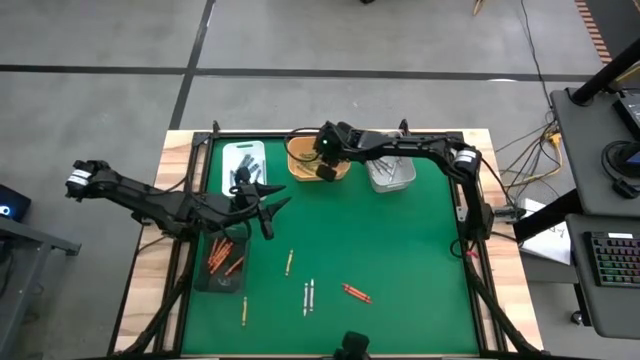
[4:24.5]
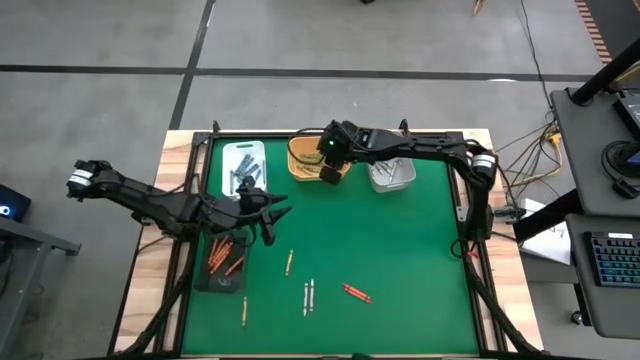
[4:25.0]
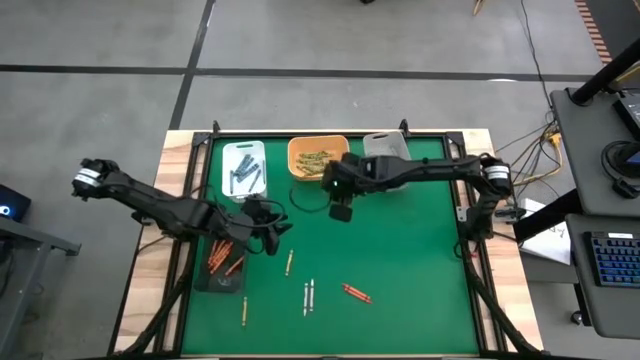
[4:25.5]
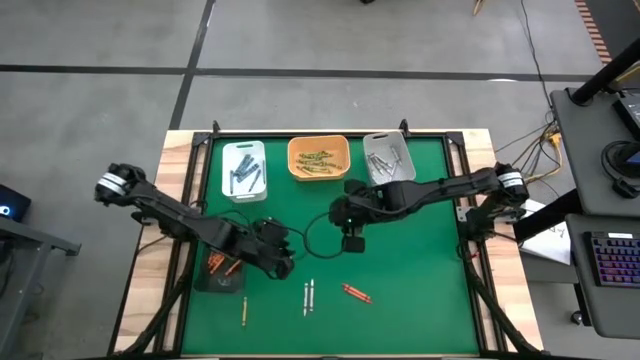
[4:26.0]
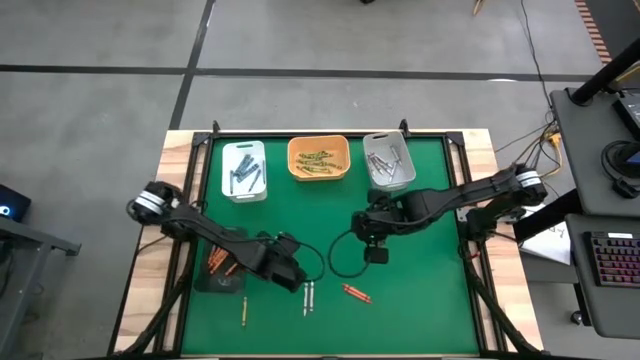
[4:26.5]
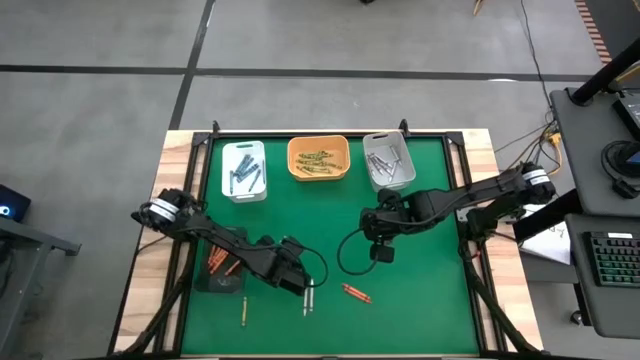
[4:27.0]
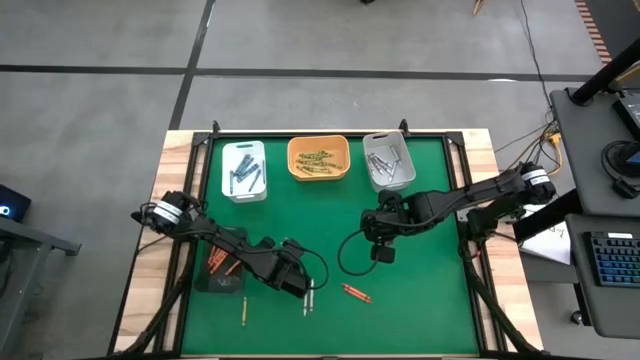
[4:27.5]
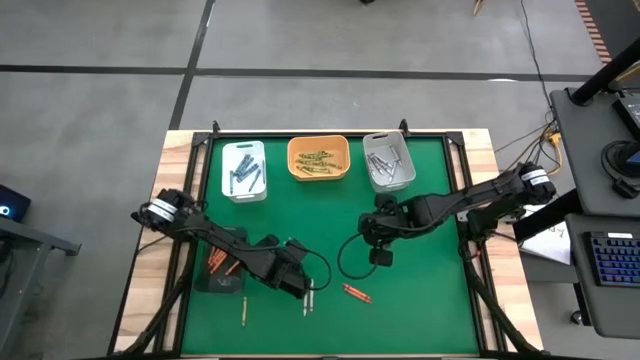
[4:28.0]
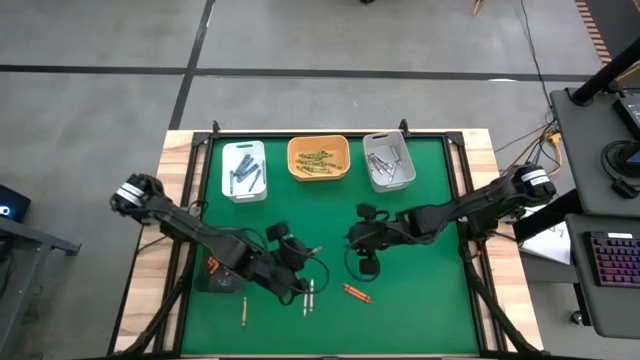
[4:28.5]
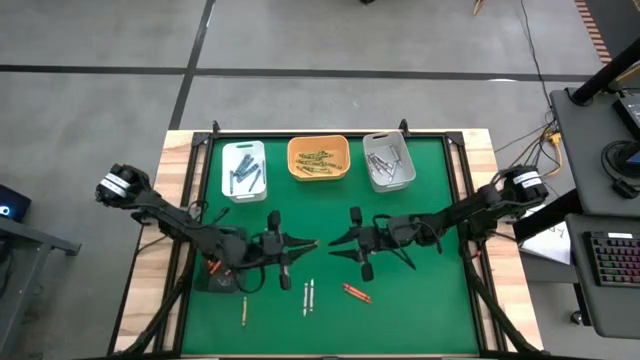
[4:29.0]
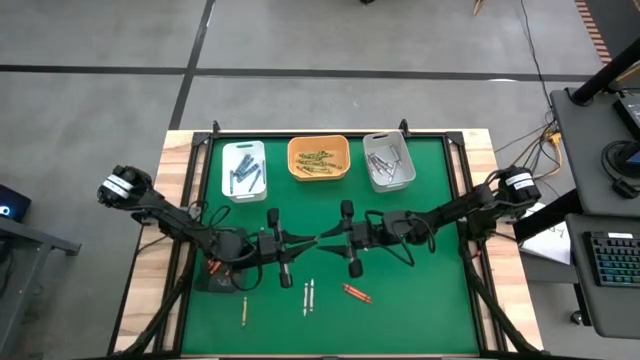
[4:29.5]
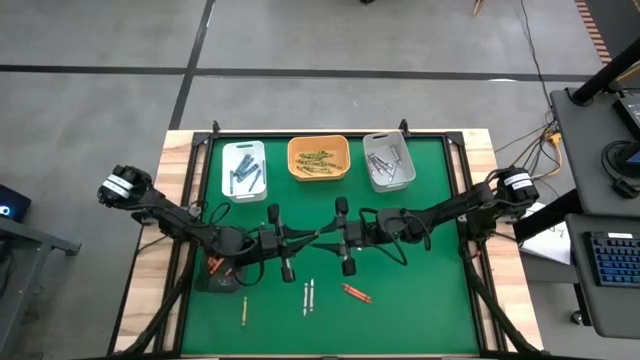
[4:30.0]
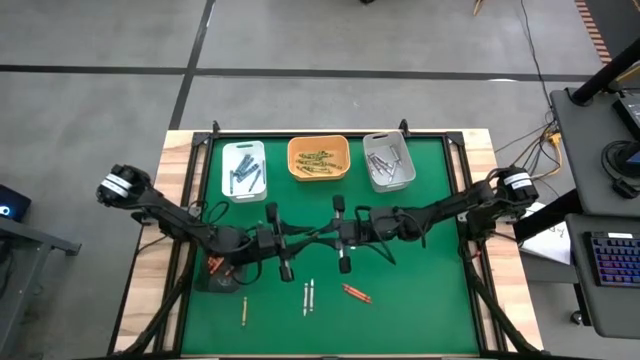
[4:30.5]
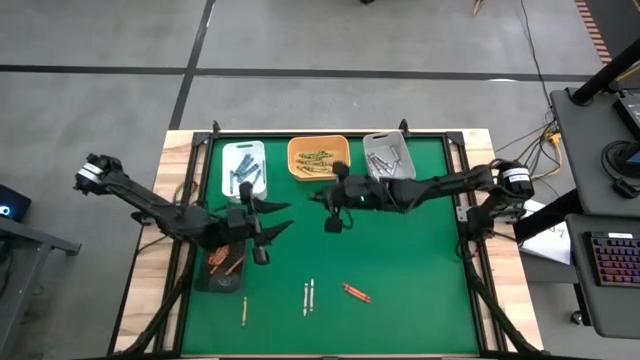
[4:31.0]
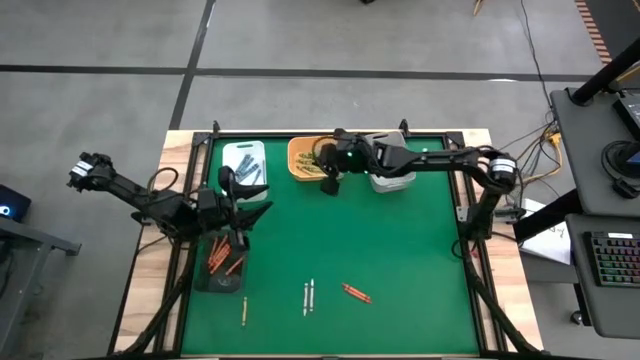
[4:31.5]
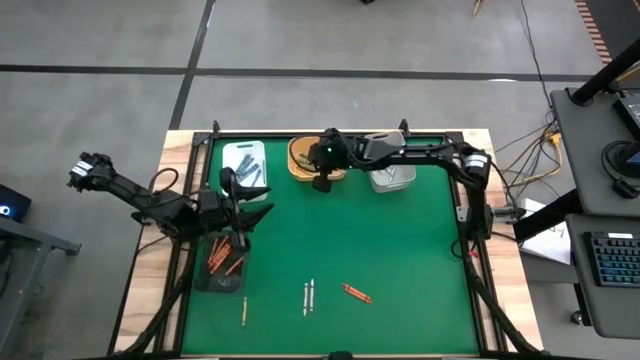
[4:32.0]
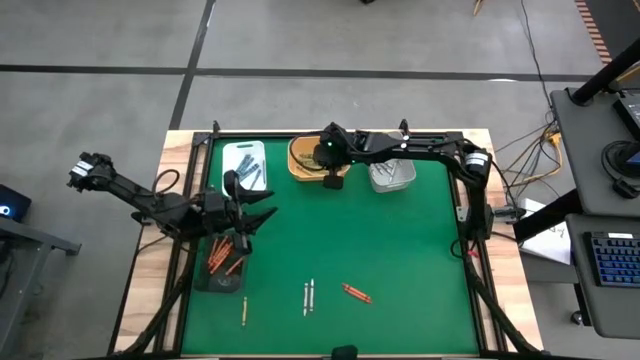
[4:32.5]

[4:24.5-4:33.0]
Task: Sort crayons
Put the green crayon into the yellow bin

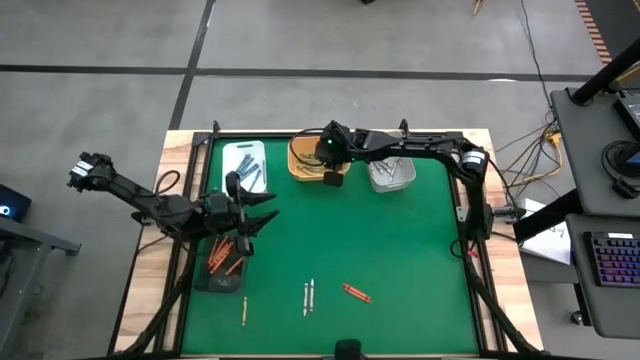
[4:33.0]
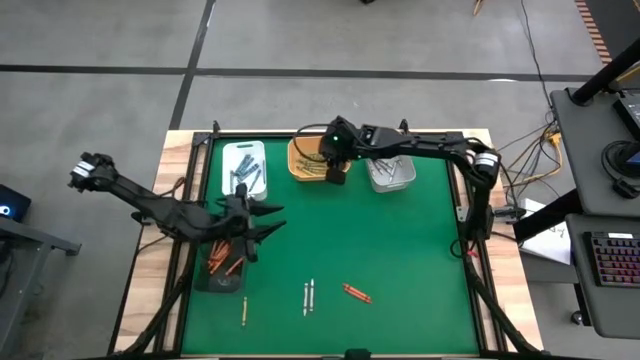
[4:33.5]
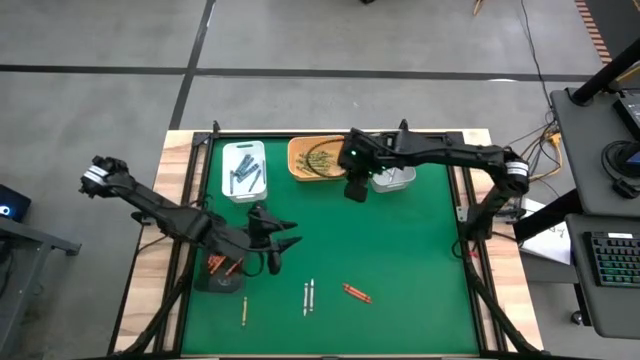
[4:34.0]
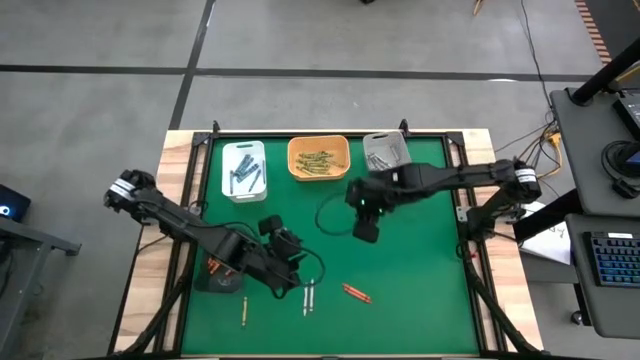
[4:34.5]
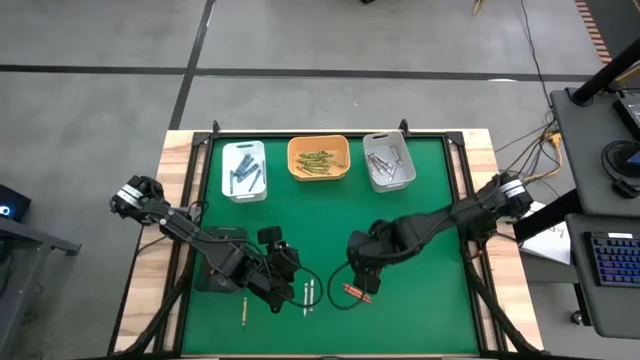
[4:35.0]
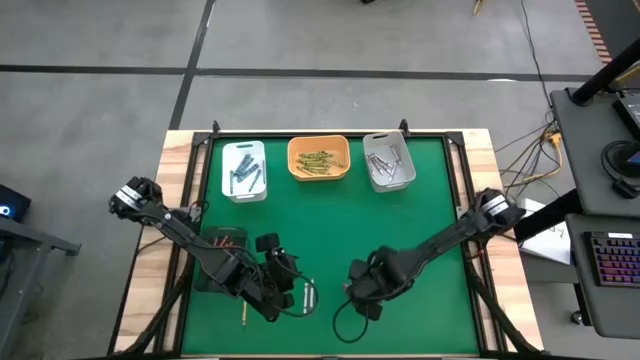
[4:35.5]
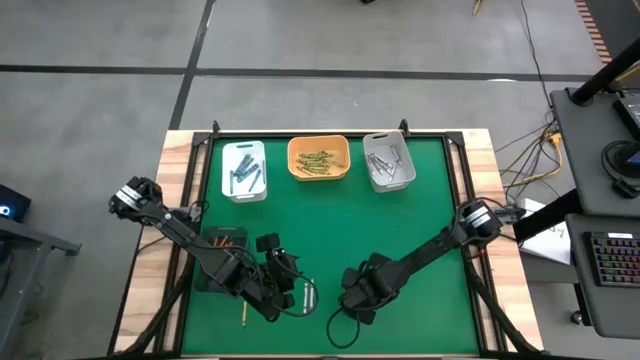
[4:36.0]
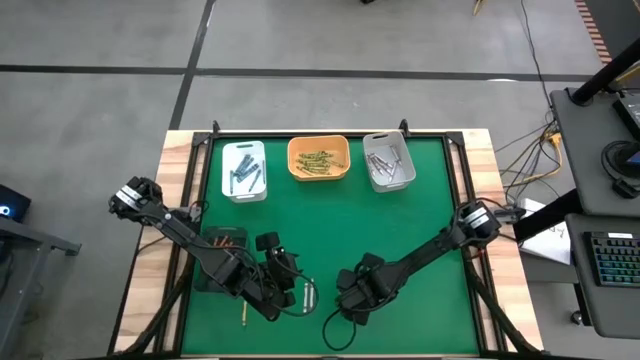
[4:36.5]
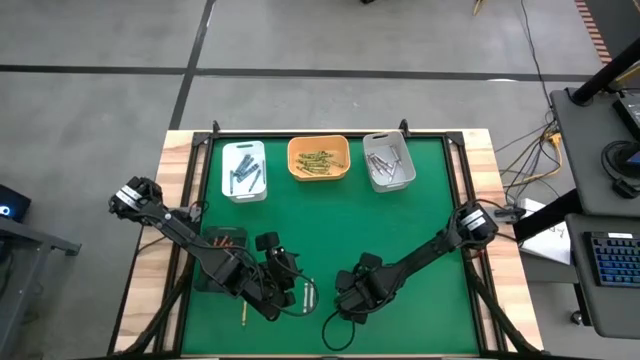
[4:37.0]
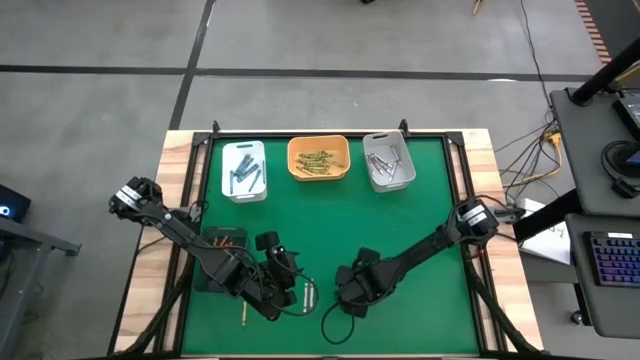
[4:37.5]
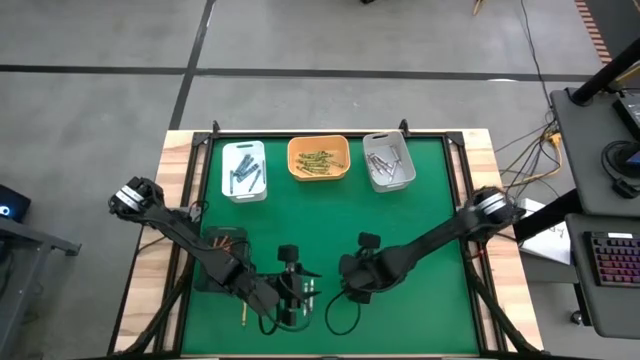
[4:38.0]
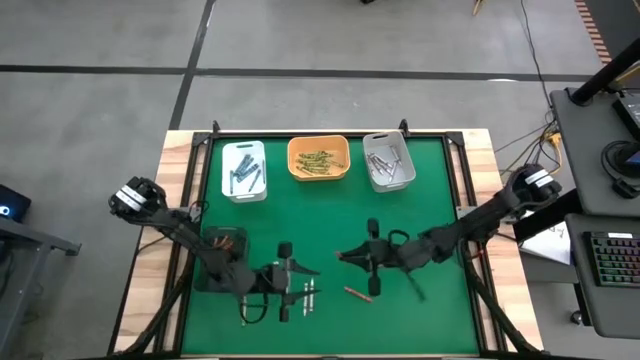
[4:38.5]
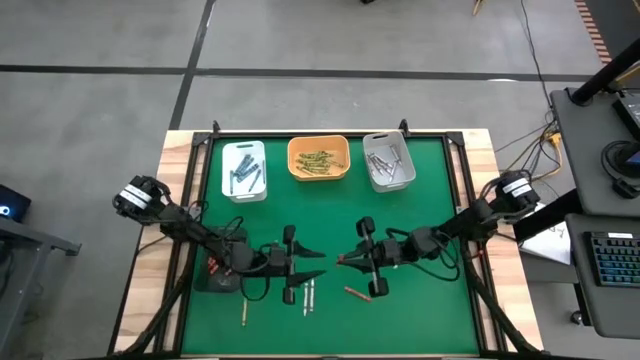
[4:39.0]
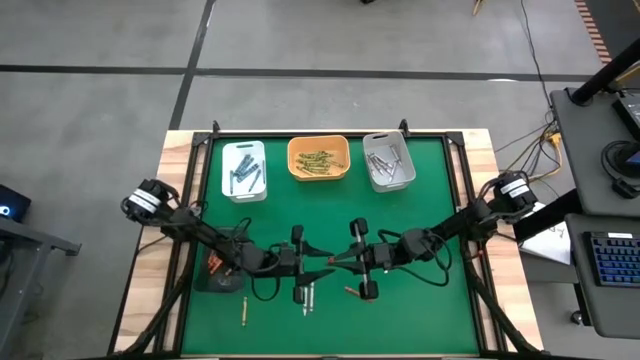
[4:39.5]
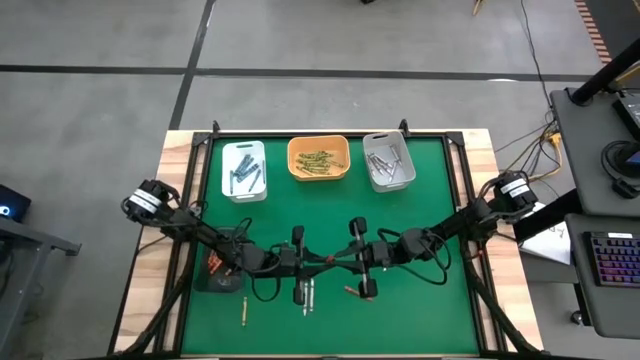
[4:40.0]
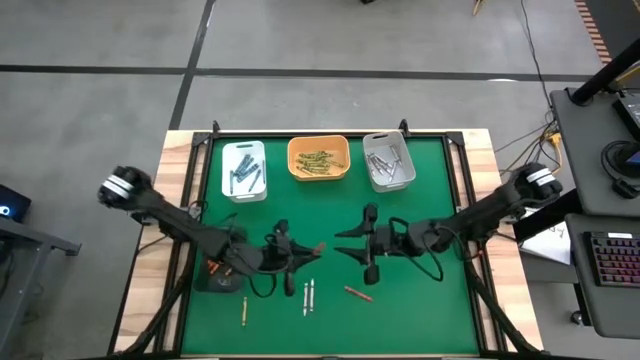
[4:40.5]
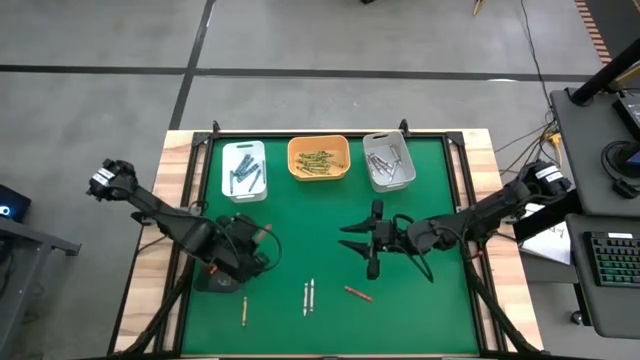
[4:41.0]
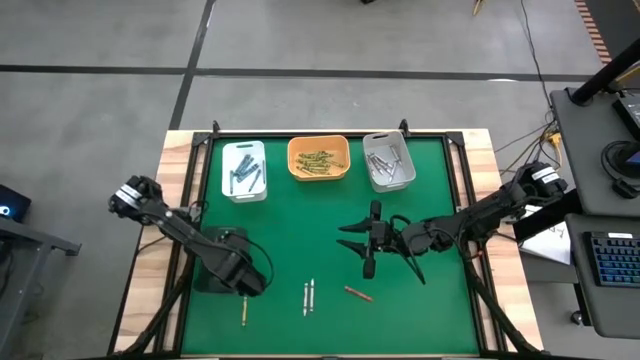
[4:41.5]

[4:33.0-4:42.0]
Put the orange crayon into the black bin

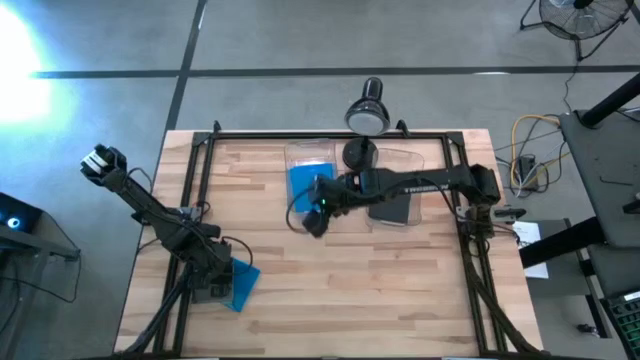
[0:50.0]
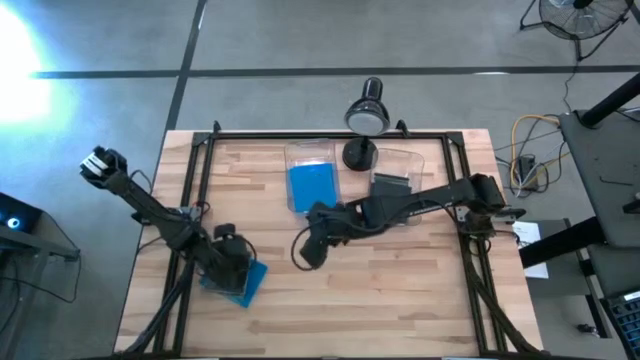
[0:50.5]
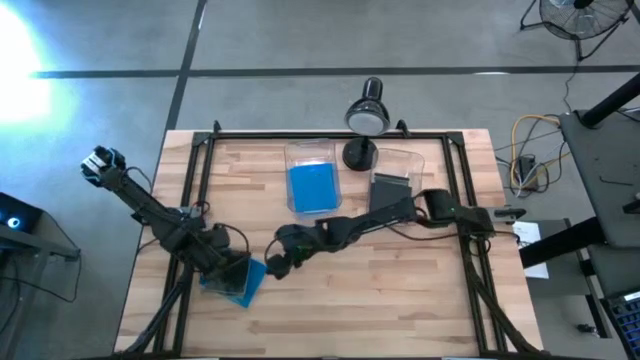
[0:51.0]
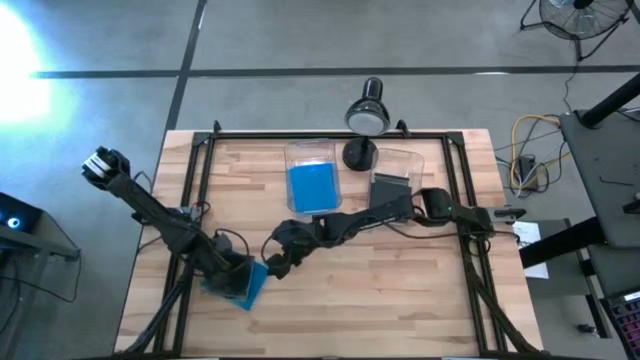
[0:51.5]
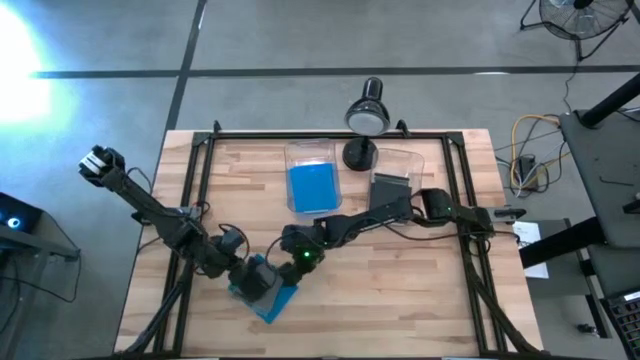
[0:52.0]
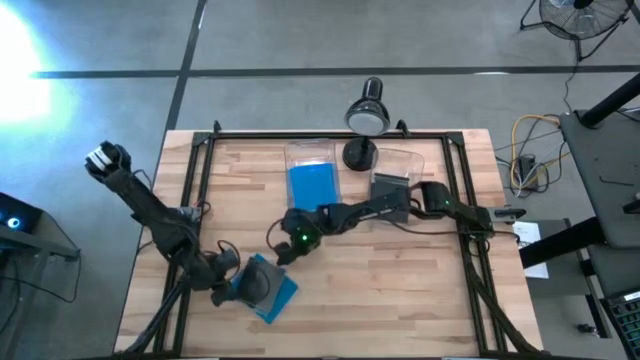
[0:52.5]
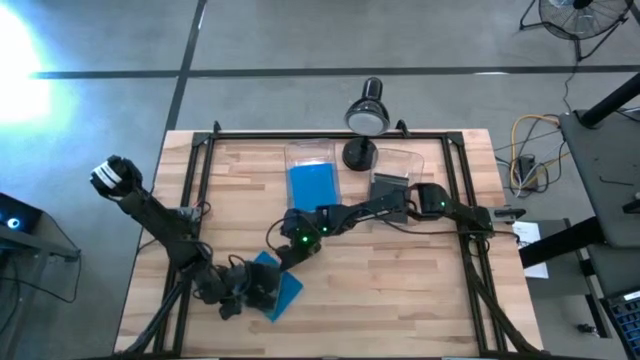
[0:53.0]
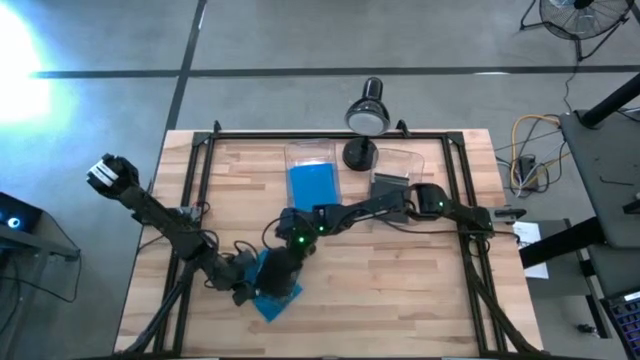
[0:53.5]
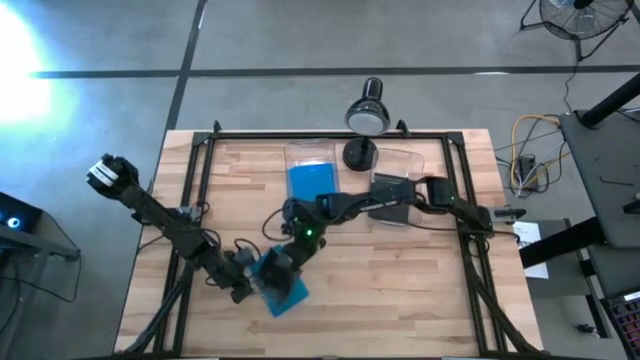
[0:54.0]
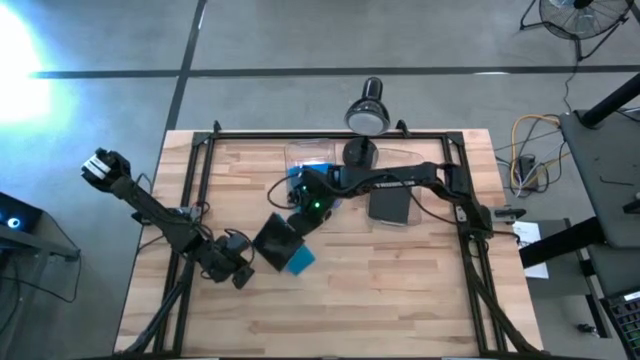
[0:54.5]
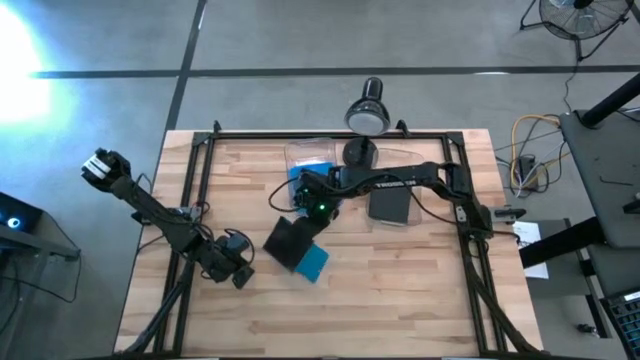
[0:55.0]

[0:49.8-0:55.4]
Task: Pick & place jewel cases by type
Put the black CD case into the right transparent bin
